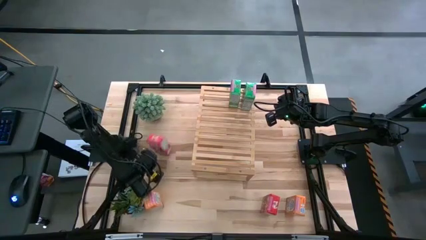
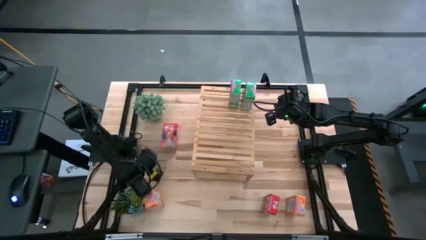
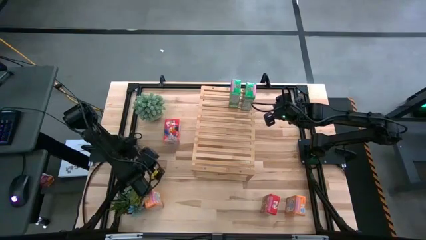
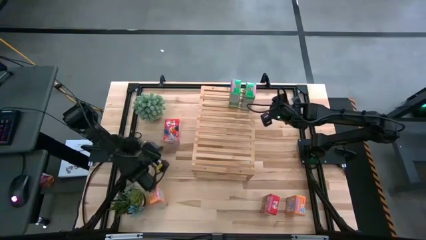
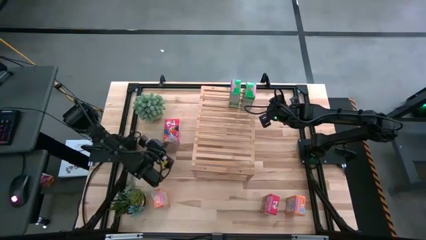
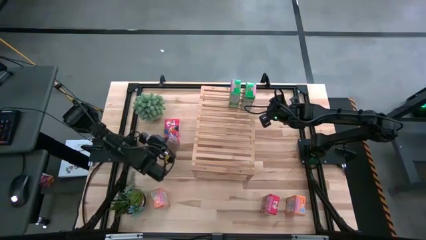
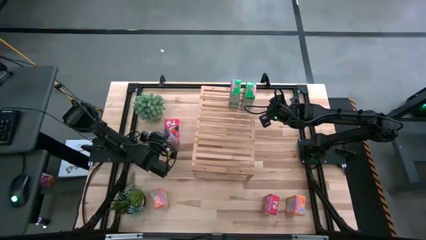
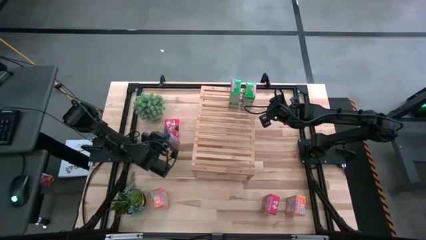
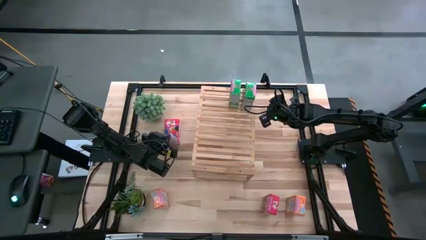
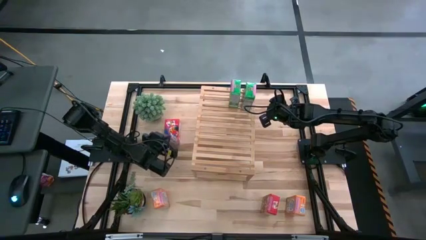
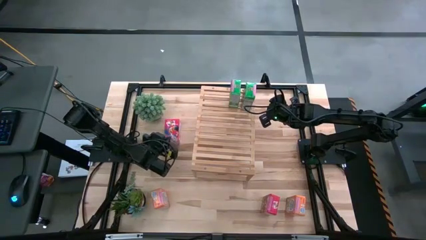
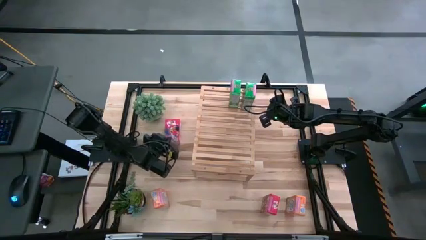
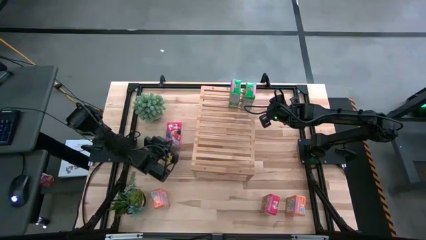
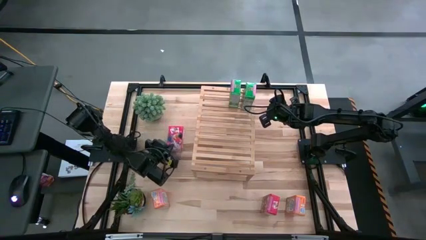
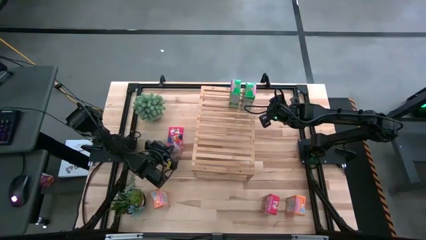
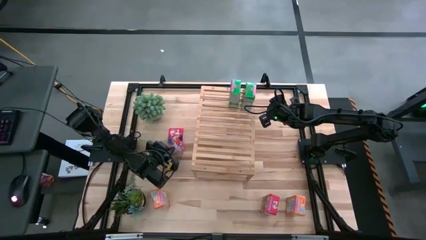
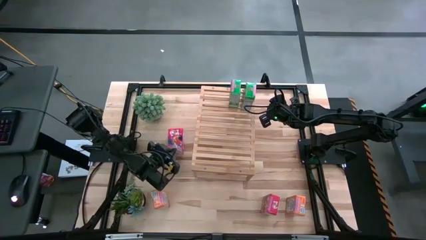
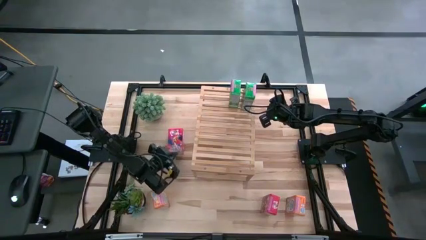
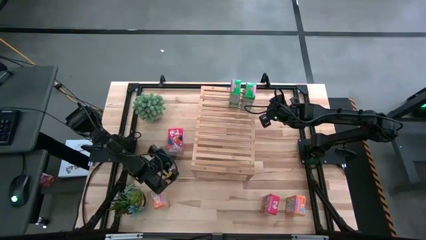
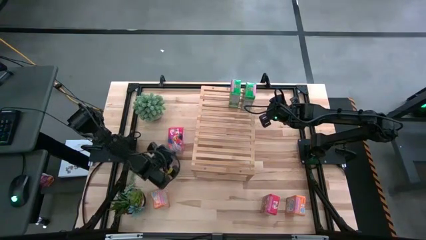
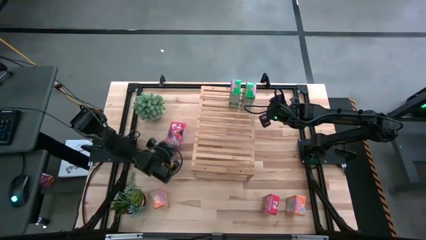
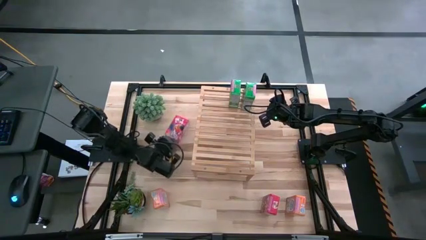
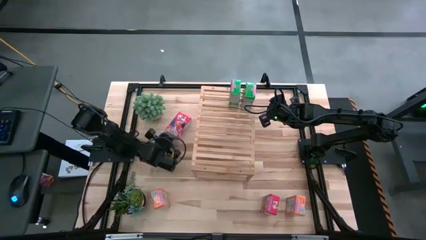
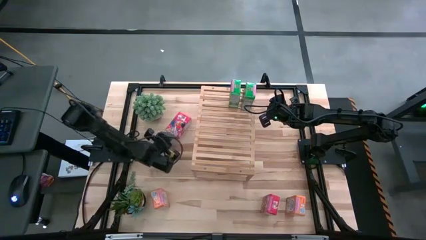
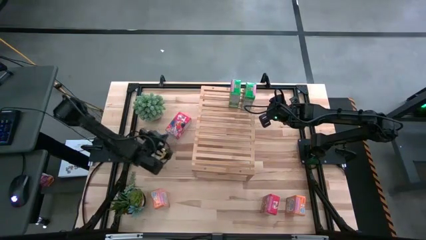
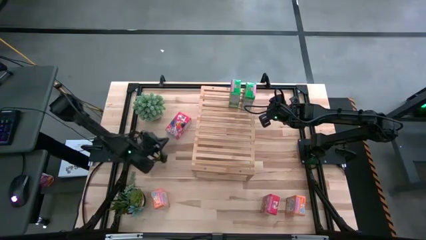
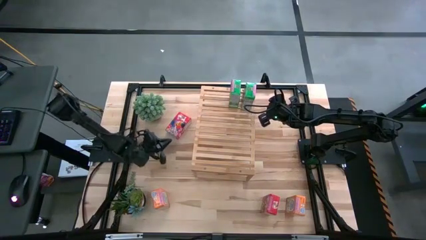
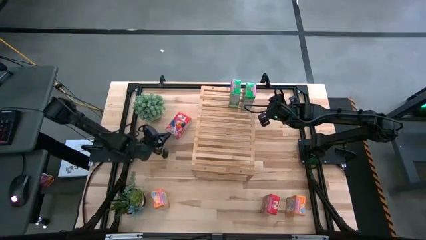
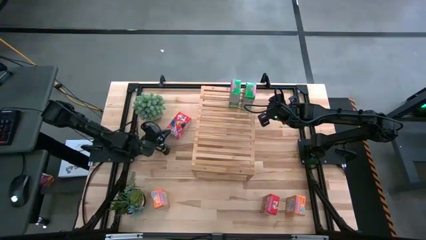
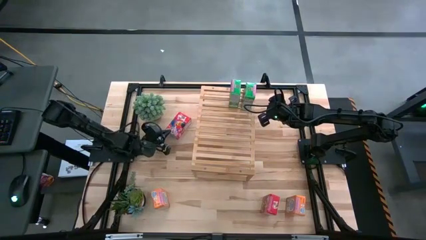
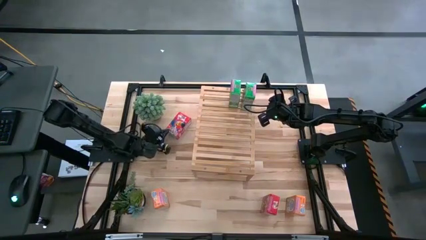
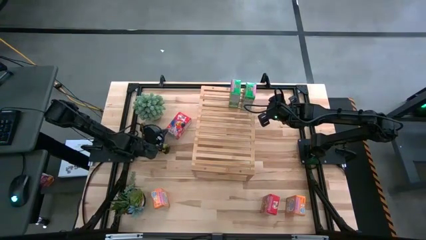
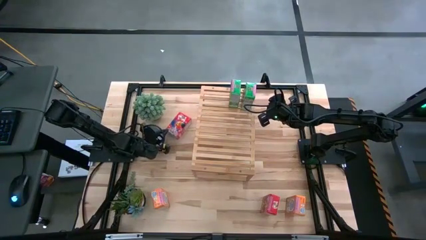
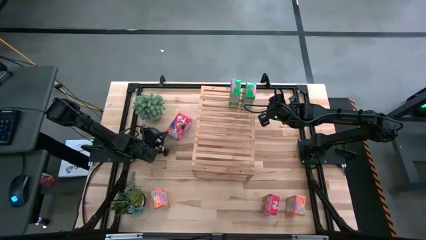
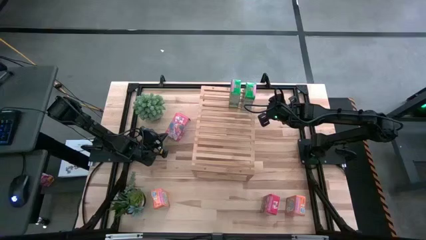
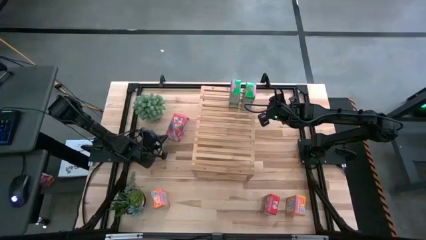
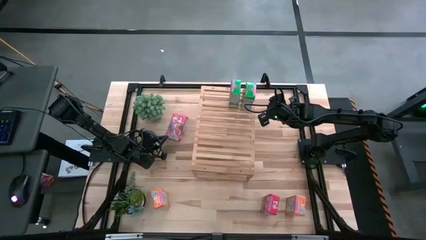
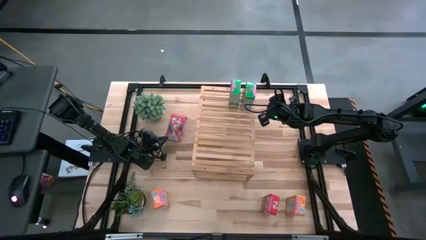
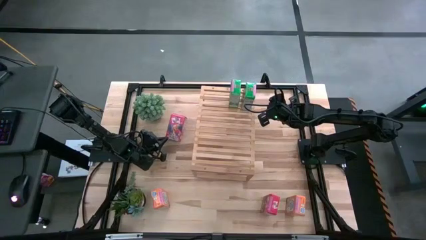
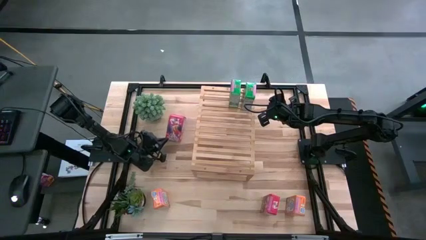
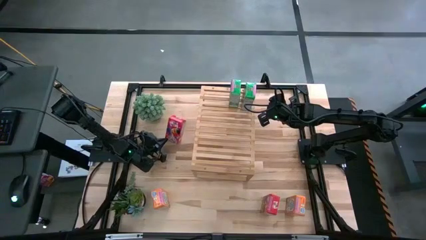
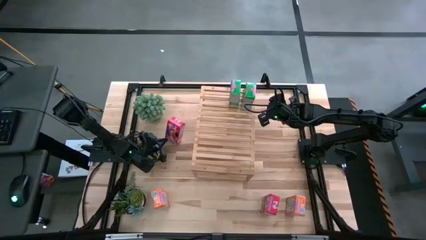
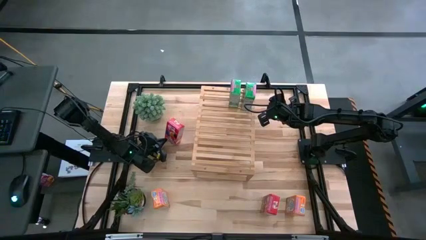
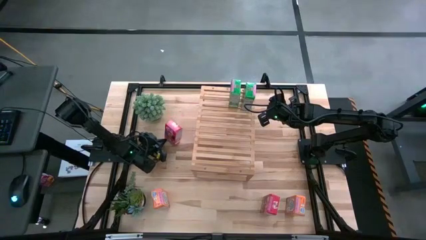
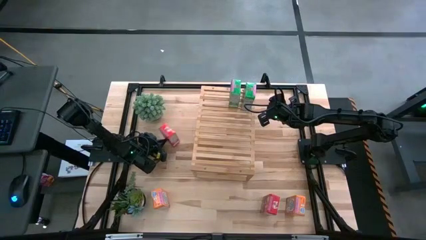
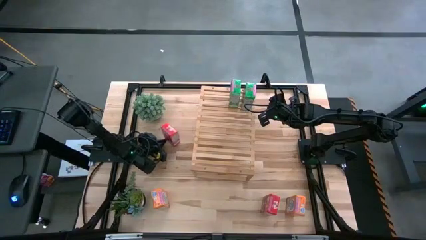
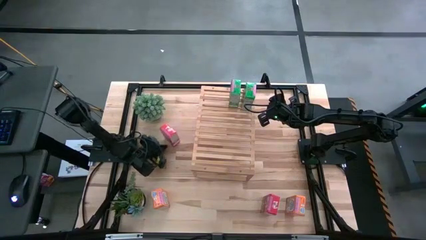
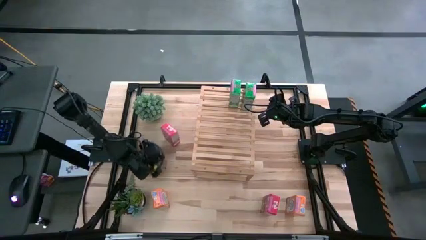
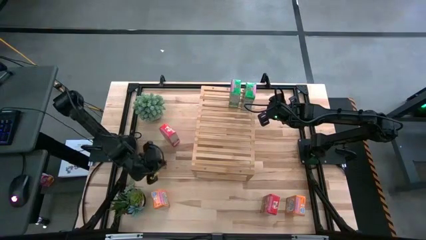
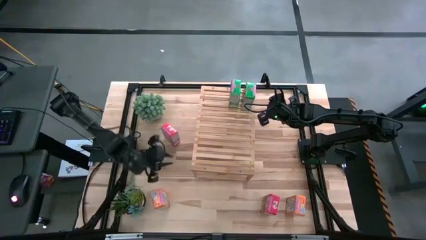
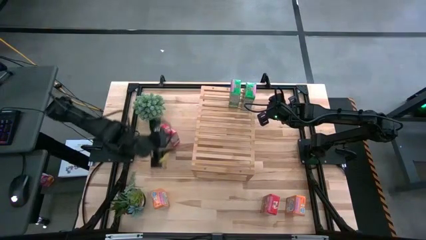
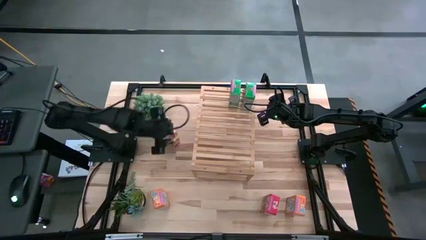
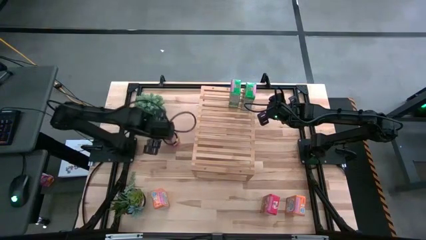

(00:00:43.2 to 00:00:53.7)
Task: Stack cereal on shelf
Put the left red box cereal on the shelf

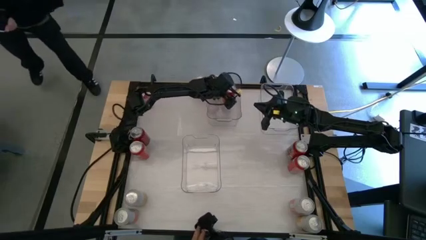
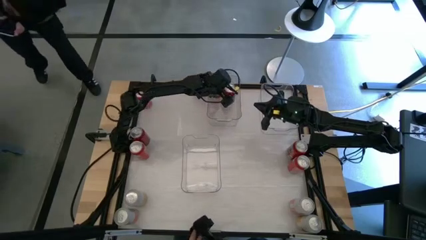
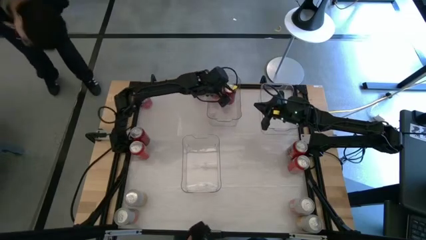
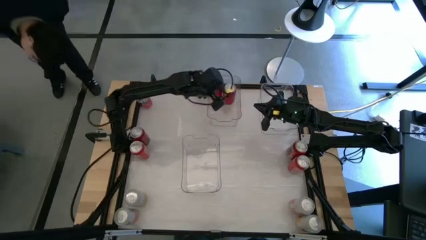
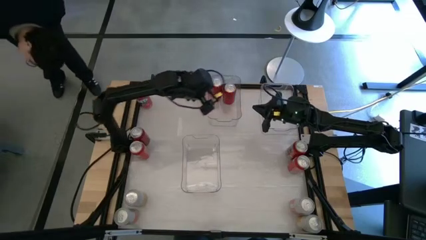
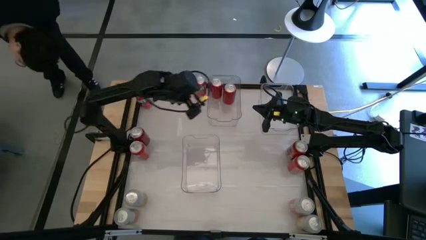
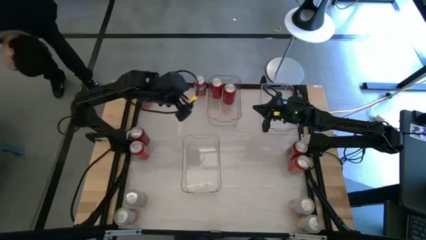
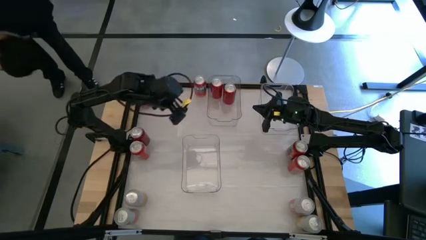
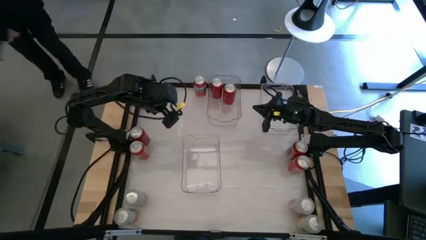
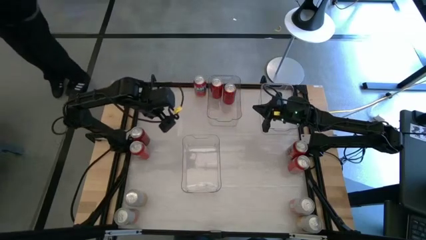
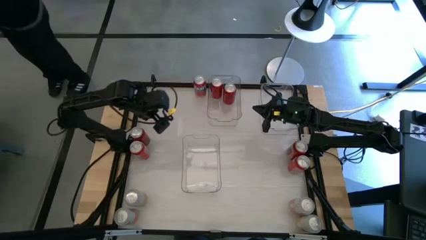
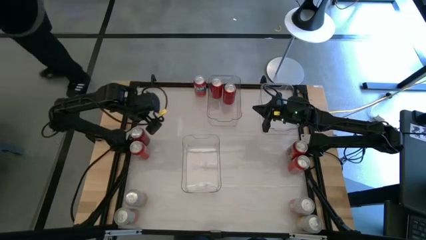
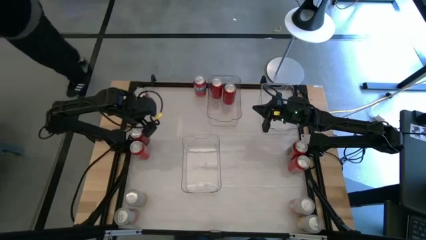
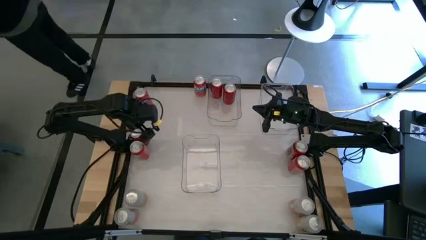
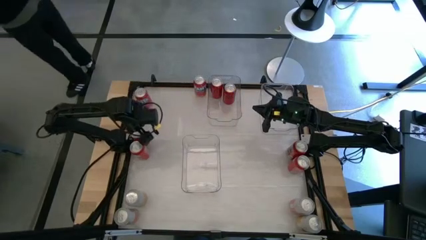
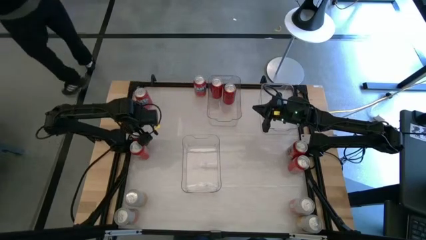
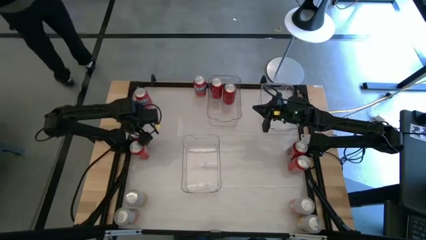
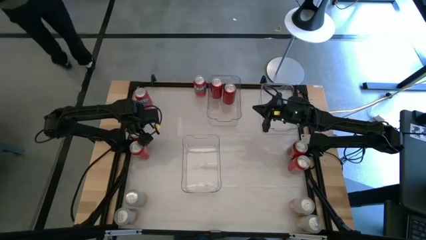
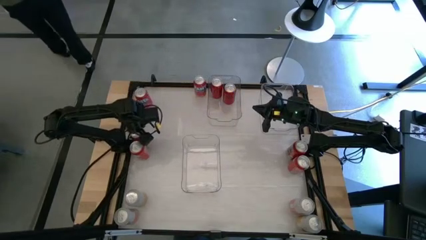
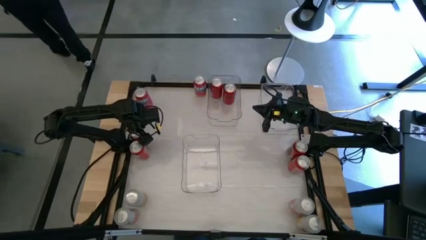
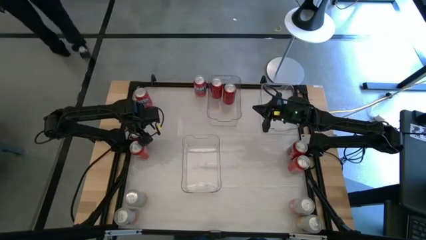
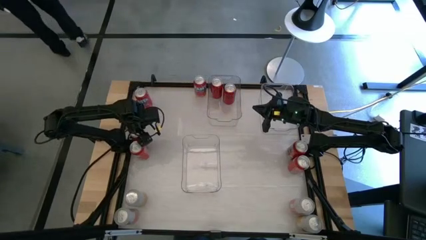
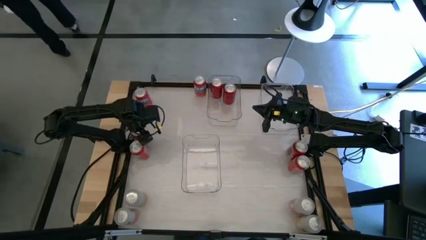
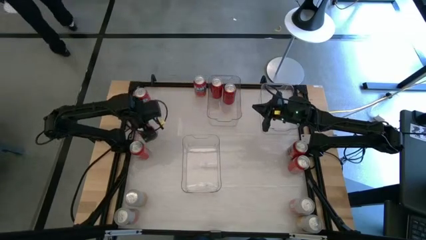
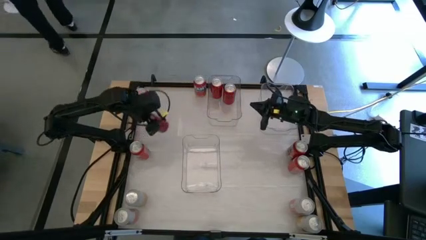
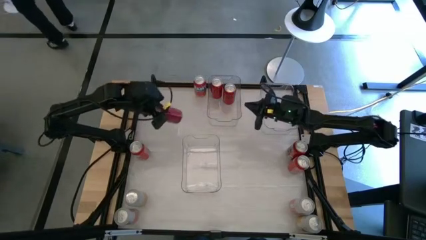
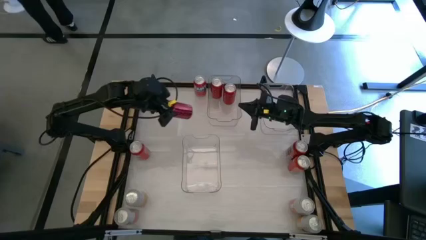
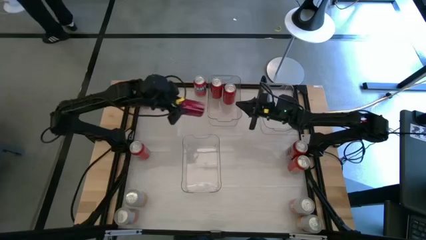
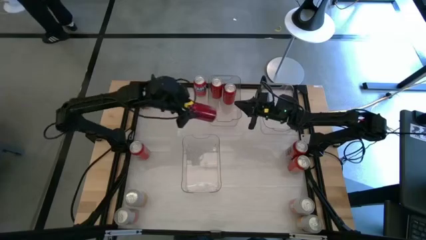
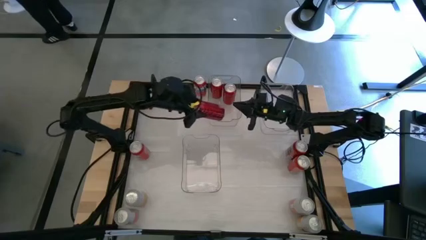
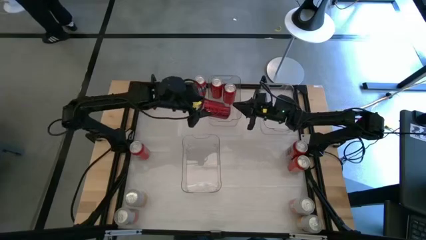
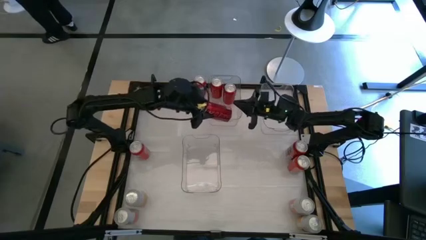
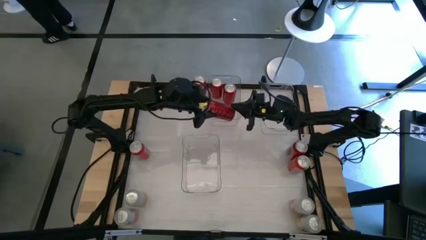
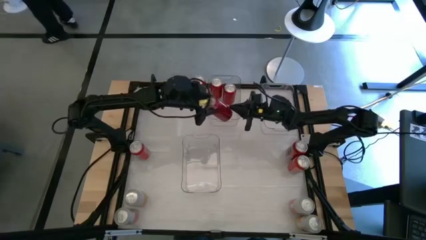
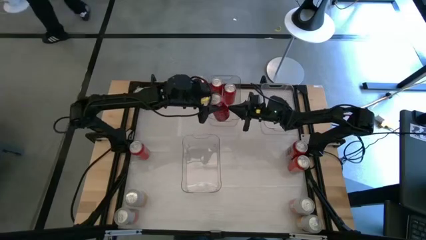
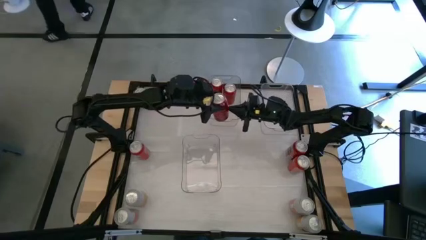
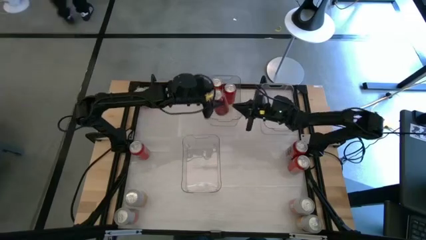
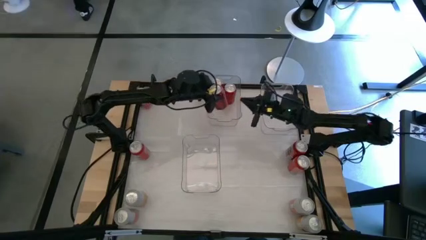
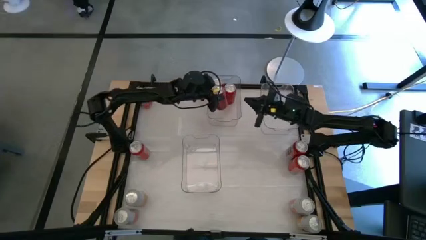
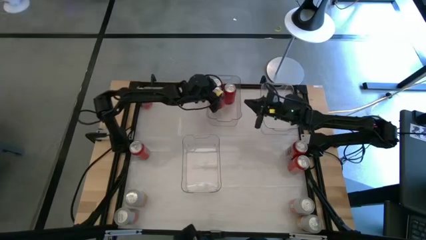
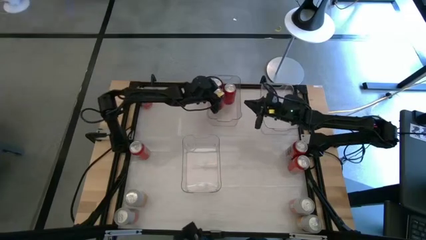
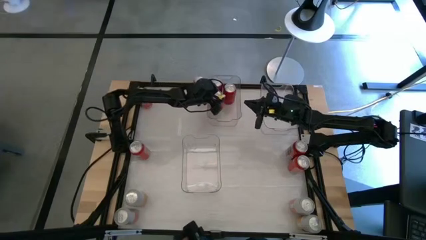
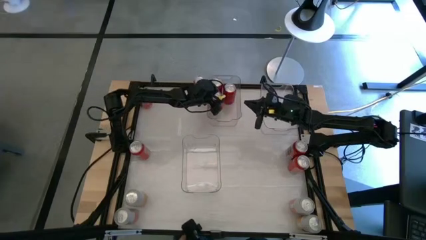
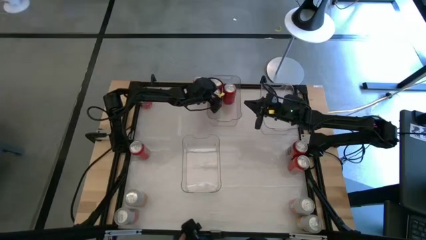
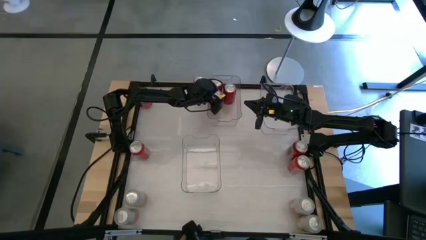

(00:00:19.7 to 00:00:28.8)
Task: Sort soda cans
Put the left red-black soda can into the top left transparent bin
